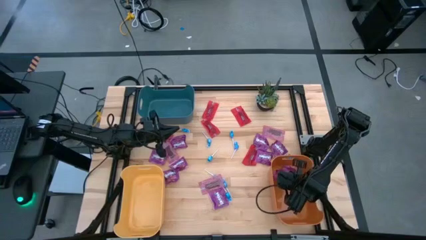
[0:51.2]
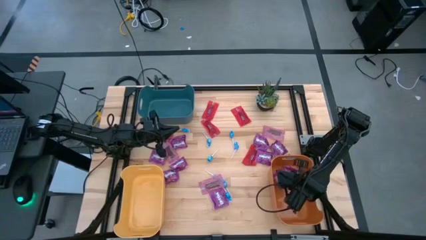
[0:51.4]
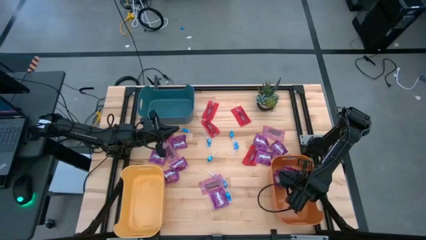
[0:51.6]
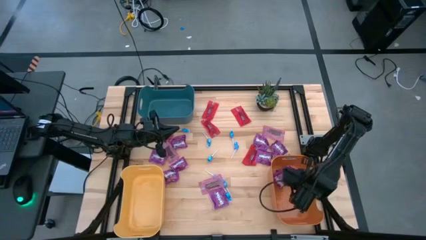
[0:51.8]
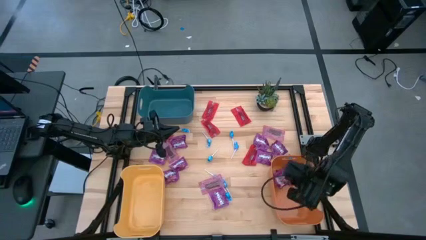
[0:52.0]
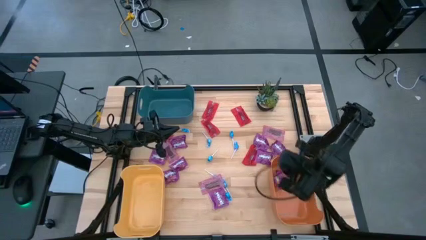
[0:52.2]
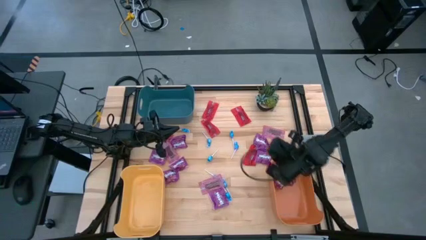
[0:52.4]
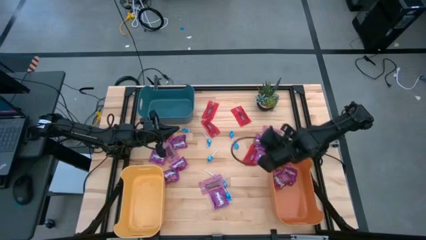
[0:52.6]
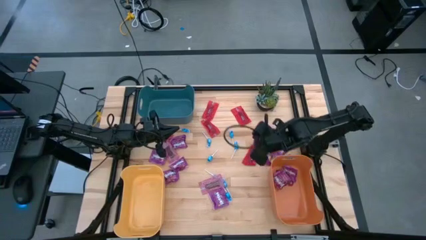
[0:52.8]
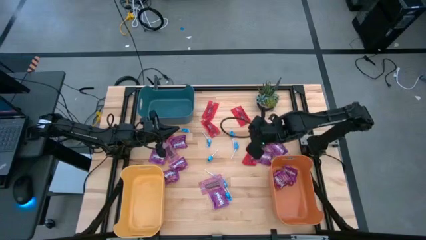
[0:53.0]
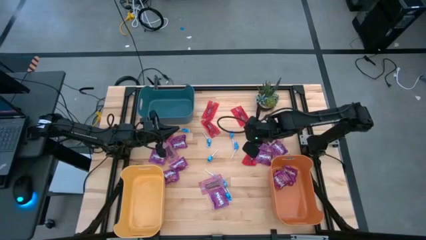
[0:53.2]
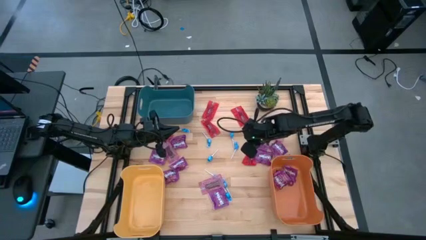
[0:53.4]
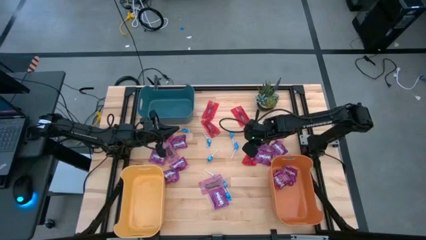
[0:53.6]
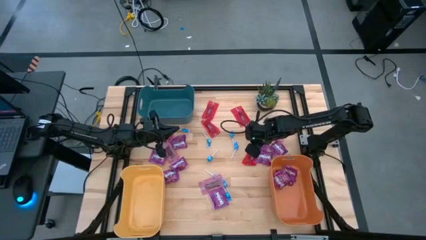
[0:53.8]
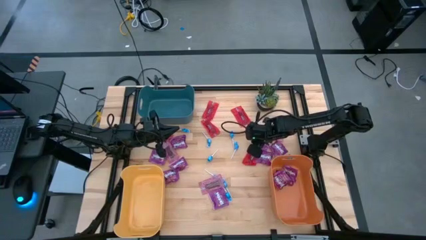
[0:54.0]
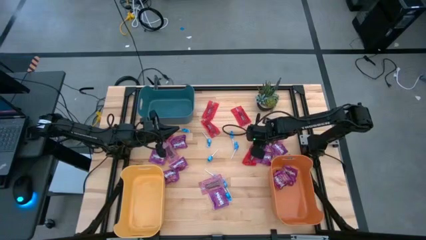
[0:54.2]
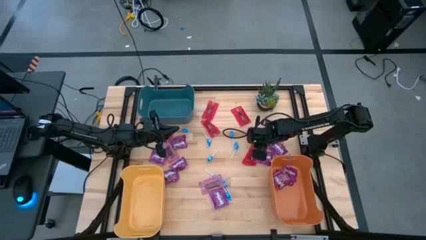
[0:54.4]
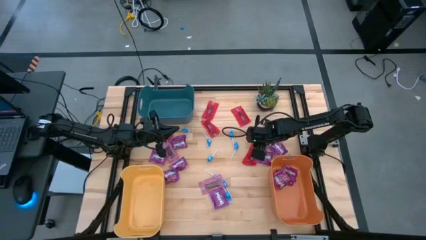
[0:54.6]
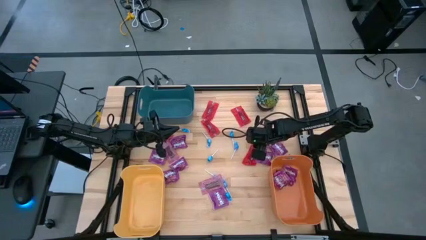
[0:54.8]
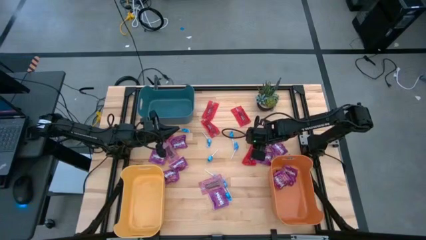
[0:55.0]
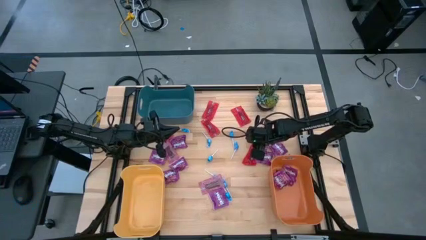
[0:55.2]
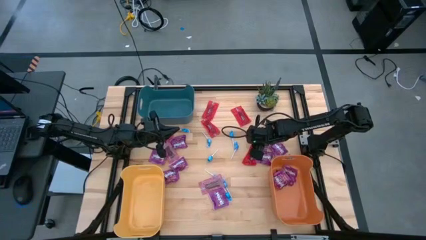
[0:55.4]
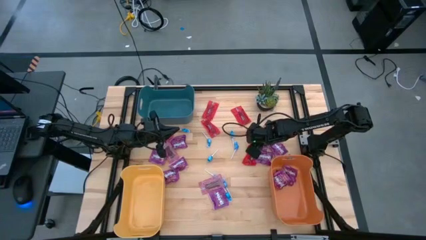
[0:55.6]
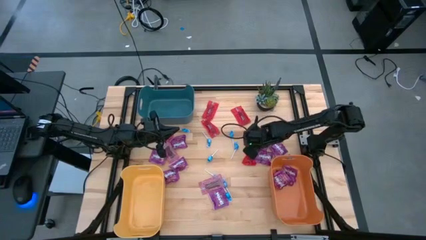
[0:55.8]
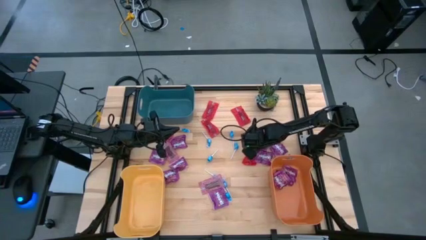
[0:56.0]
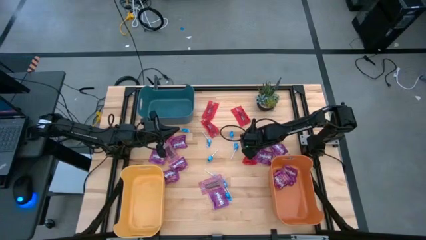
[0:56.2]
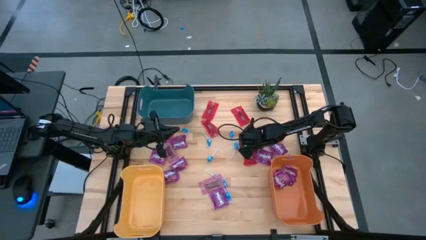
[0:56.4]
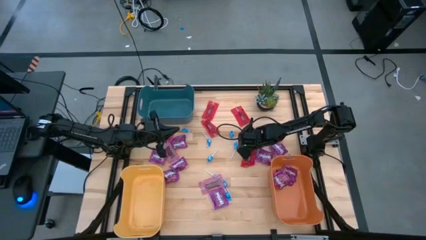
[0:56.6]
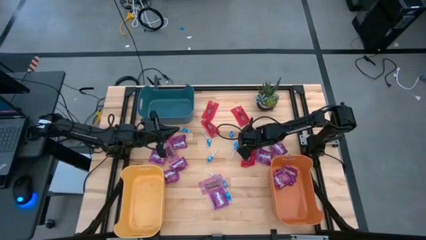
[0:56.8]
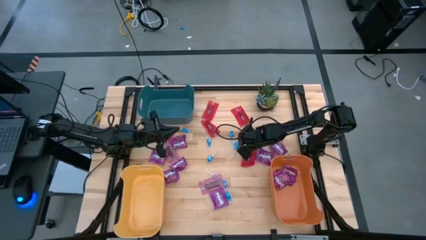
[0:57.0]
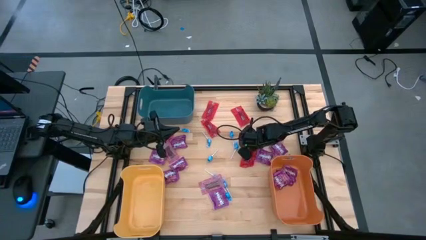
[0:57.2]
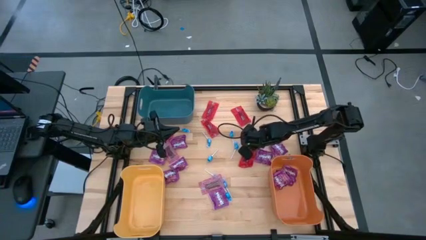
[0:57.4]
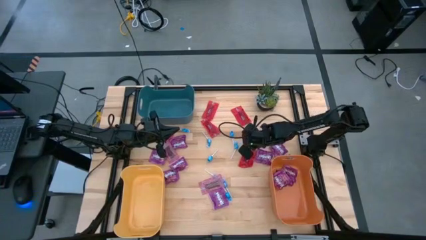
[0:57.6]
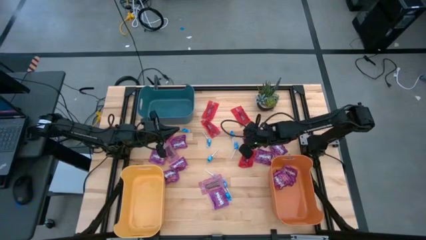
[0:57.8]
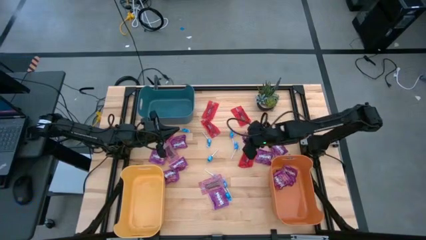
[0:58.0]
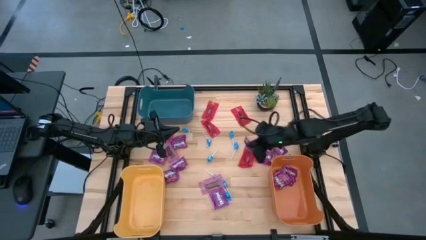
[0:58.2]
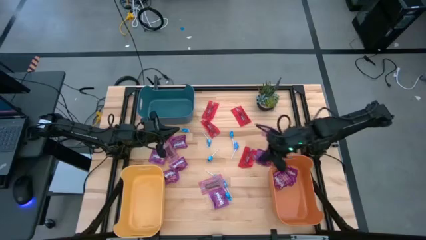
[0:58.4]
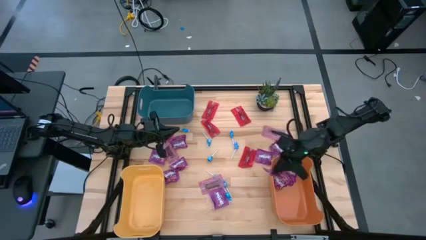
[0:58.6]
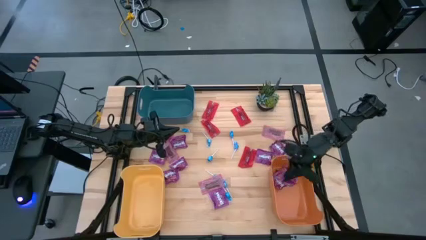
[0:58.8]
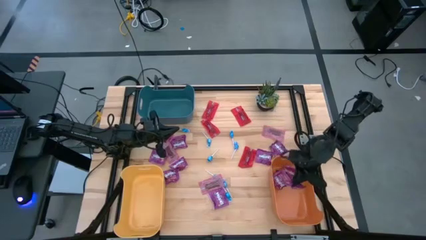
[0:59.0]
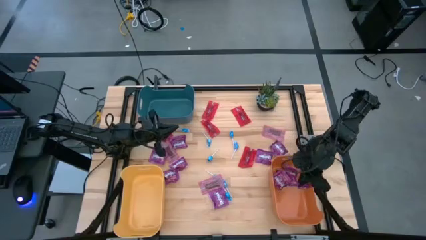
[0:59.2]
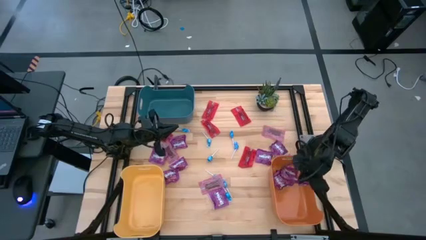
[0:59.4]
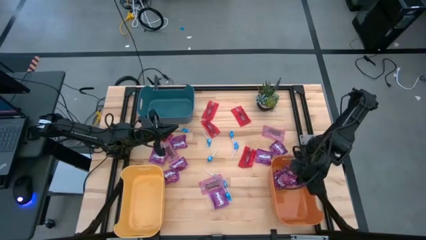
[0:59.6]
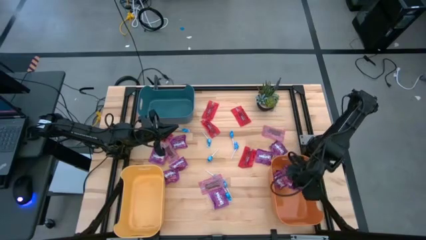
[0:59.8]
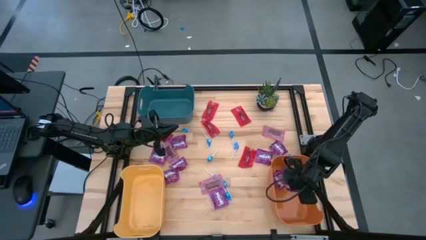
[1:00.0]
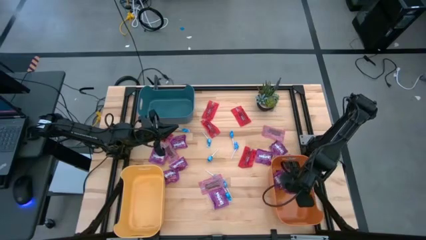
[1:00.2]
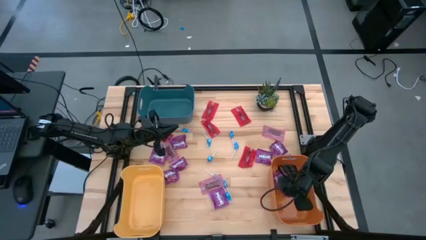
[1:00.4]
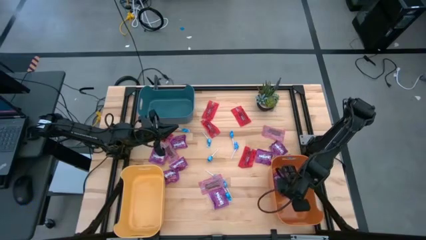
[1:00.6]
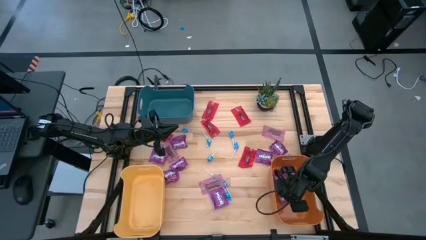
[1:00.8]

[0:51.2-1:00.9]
Task: Sort candy
Put the purple candy into the orange bin

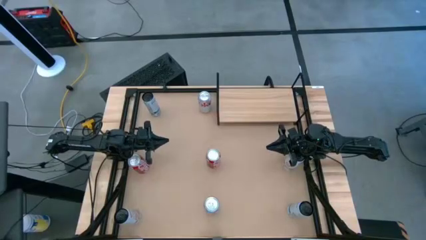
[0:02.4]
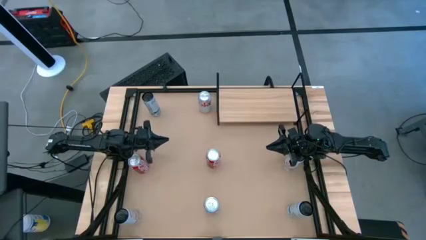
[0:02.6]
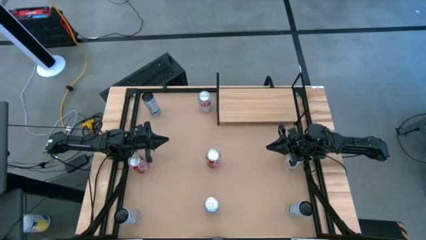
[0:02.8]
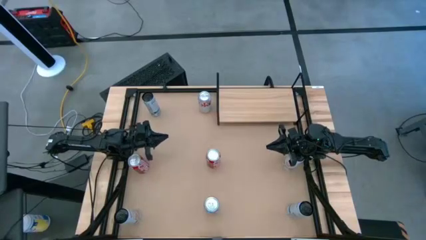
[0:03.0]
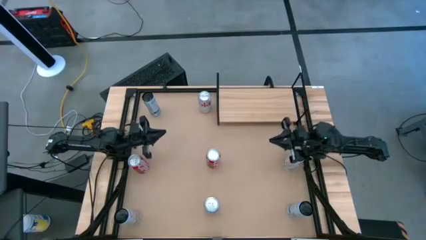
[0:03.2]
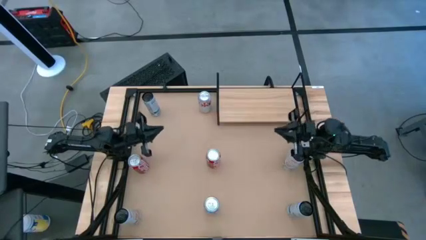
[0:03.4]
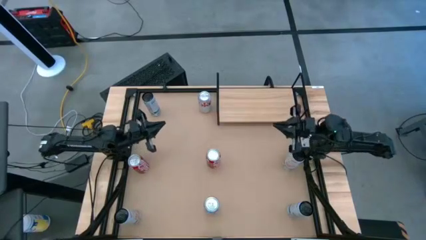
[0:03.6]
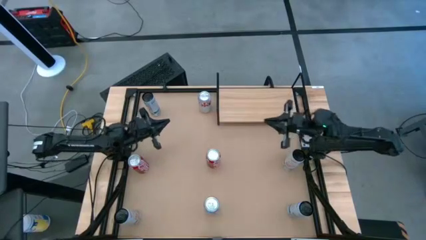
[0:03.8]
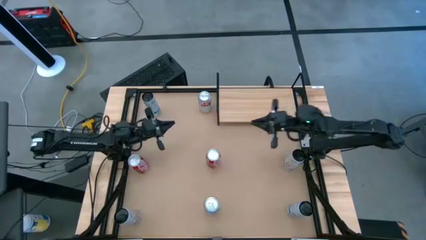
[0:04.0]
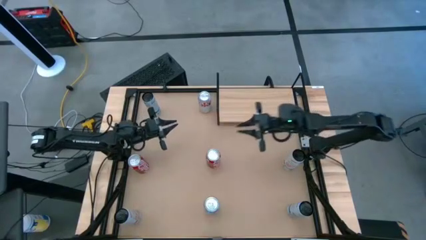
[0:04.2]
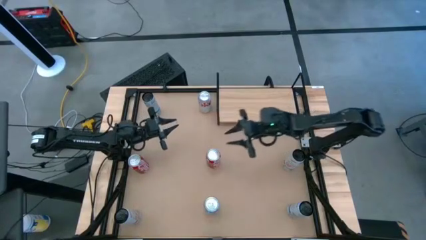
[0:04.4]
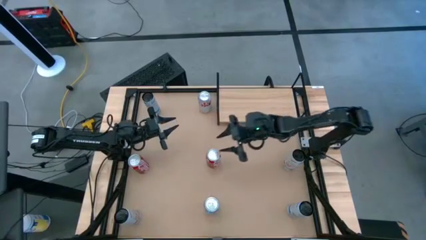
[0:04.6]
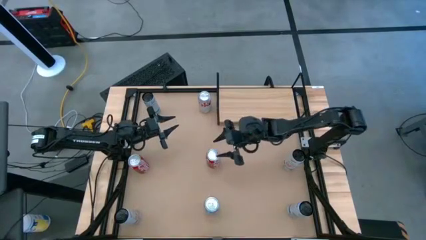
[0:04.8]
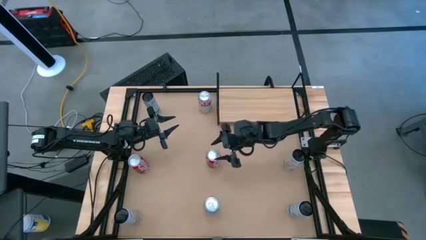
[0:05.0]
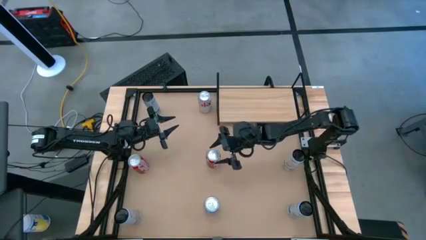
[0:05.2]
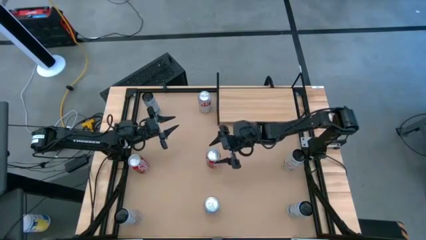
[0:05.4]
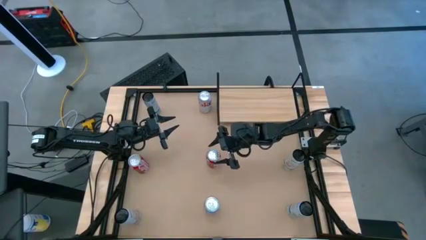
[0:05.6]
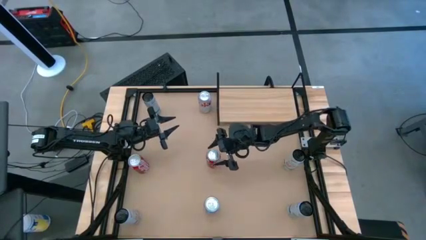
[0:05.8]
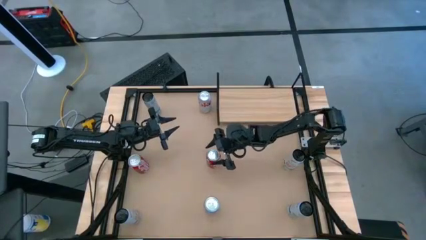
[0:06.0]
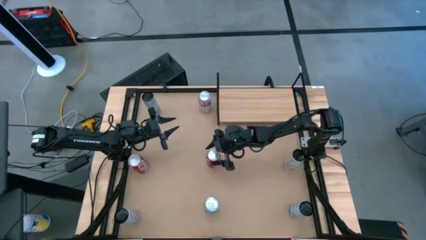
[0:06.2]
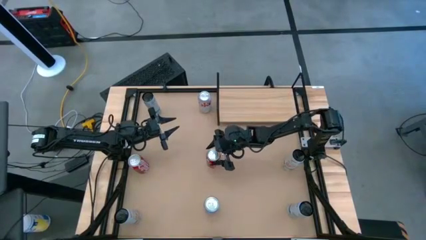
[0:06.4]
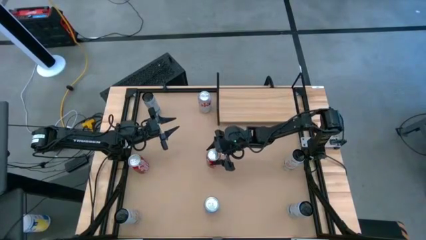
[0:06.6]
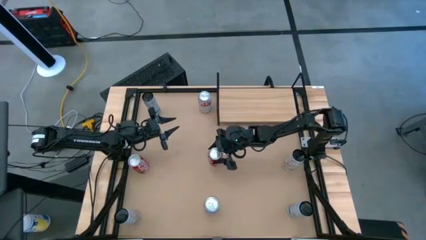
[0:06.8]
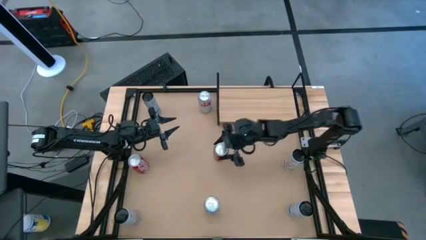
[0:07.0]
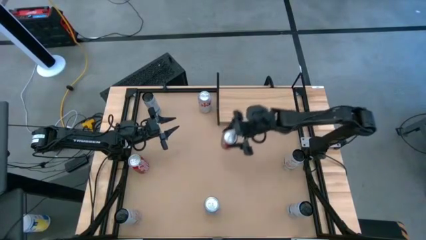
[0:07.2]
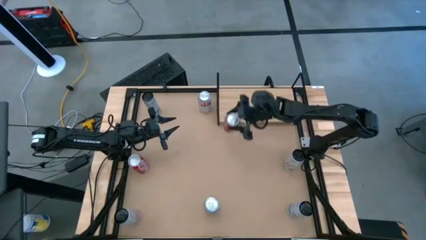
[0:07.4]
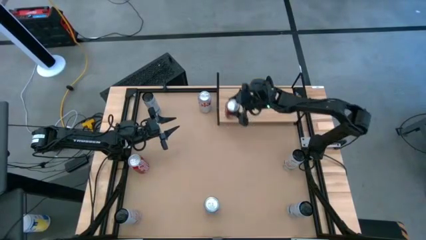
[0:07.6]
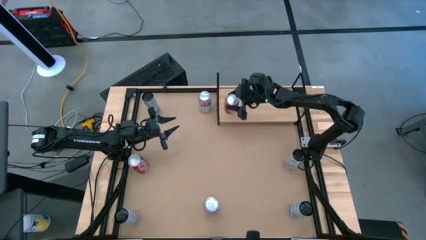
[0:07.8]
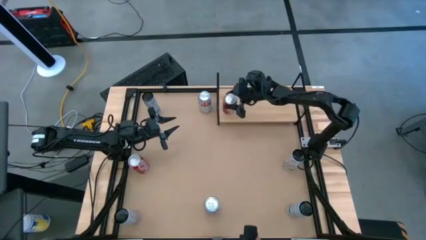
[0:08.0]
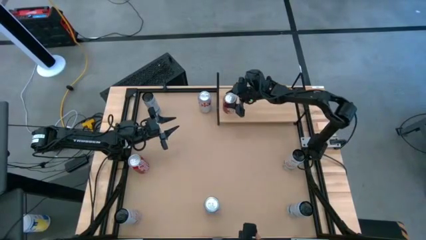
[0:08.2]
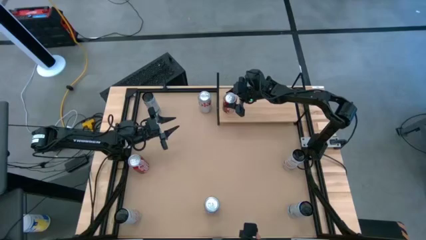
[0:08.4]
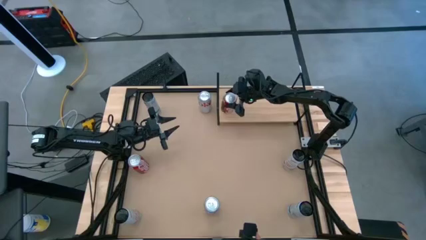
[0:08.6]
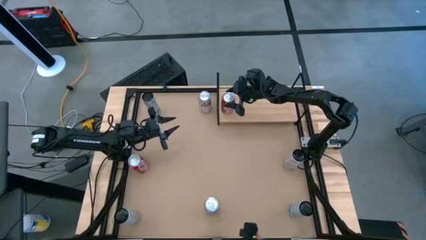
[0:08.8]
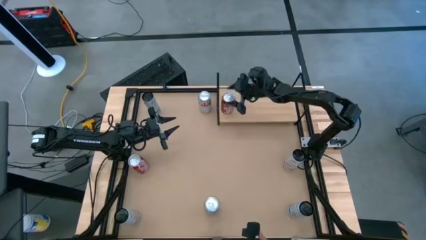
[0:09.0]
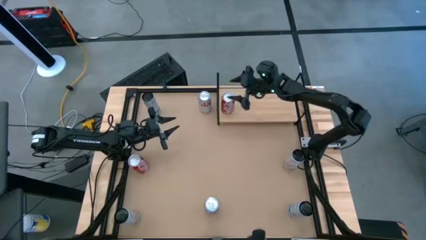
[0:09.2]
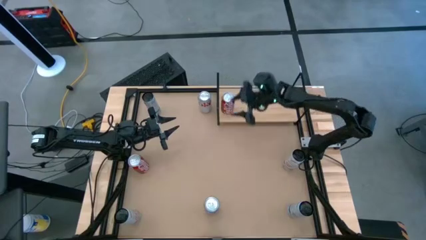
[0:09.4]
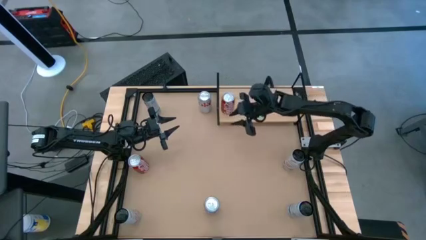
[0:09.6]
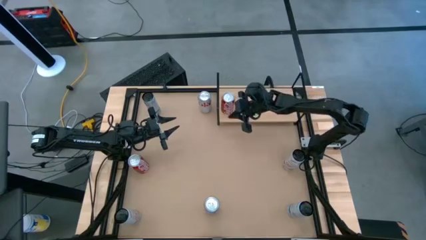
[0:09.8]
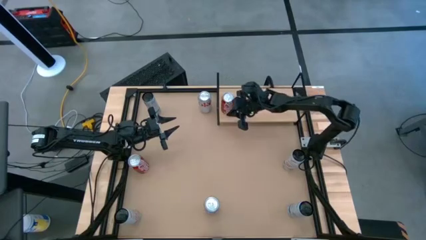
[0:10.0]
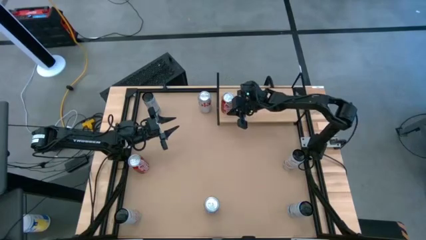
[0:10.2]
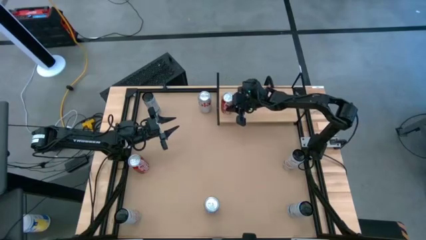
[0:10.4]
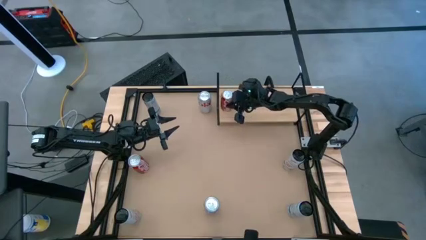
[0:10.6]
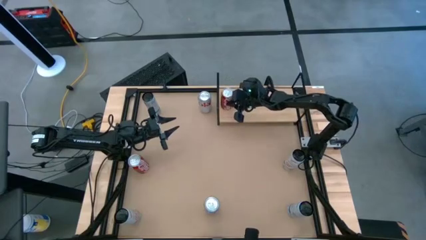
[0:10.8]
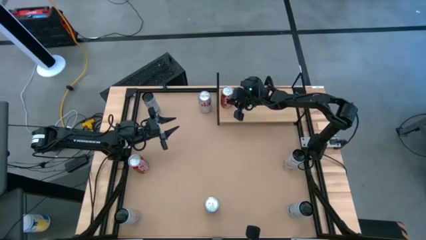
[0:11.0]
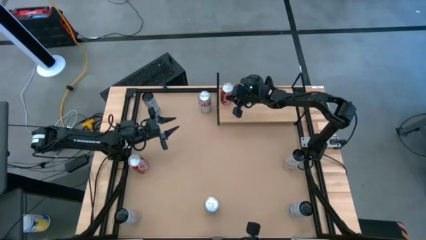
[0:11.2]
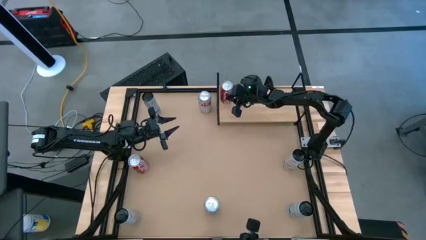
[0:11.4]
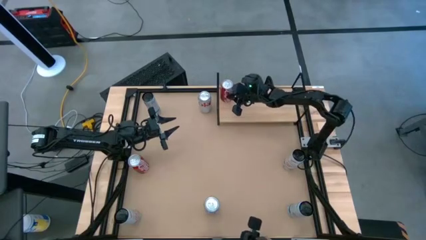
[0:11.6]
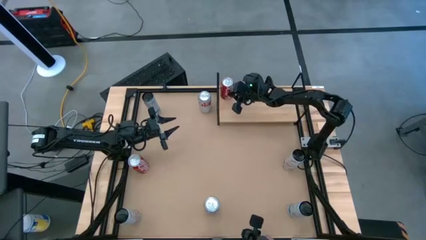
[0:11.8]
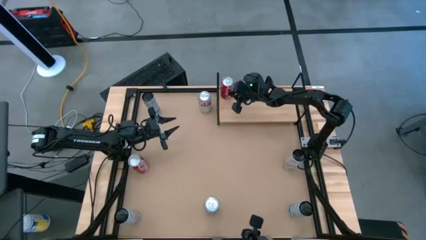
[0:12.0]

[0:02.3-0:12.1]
Task: Place canned beverage on shelf
Put the right red soda can on the shelf
